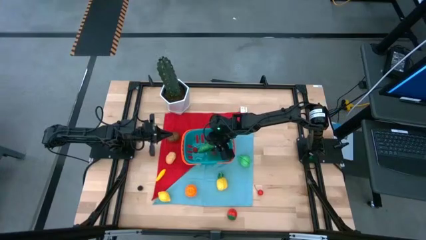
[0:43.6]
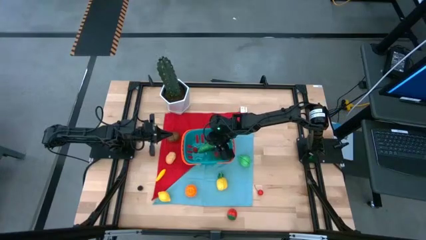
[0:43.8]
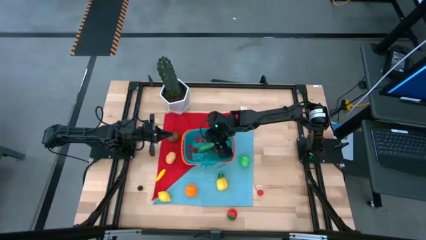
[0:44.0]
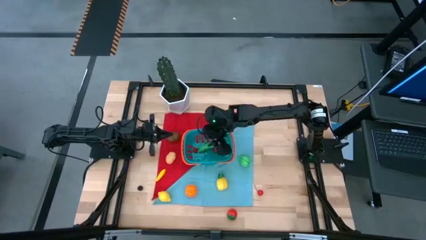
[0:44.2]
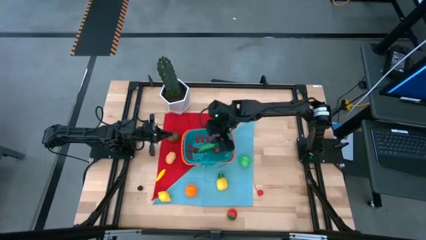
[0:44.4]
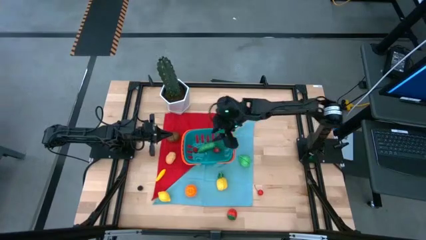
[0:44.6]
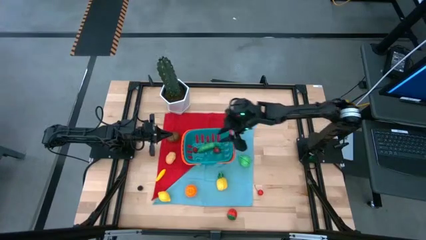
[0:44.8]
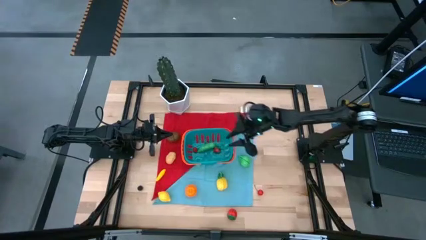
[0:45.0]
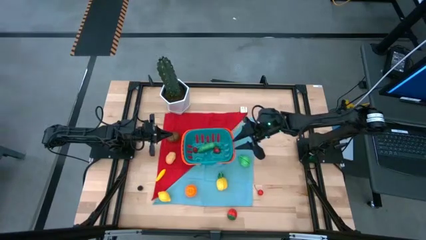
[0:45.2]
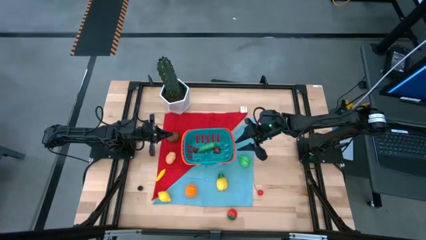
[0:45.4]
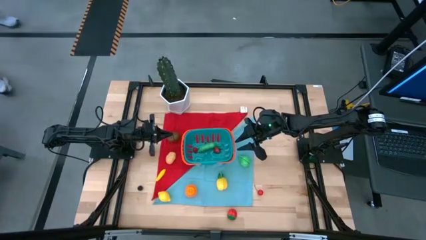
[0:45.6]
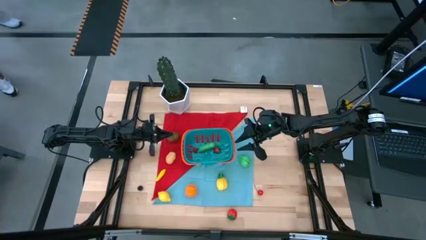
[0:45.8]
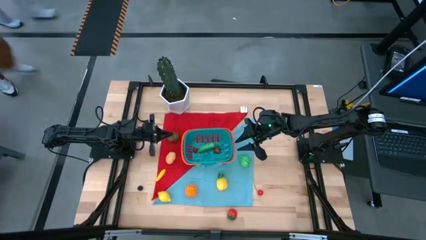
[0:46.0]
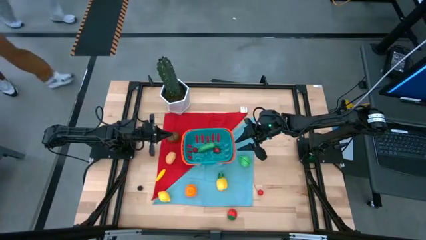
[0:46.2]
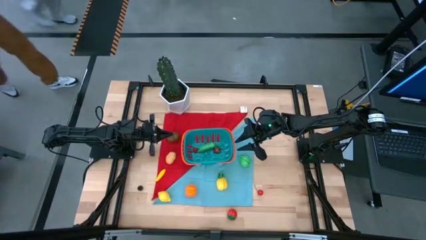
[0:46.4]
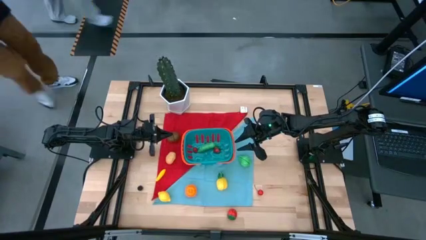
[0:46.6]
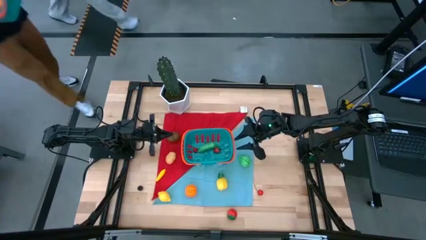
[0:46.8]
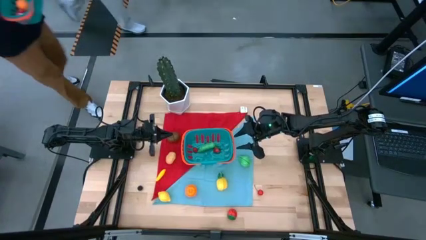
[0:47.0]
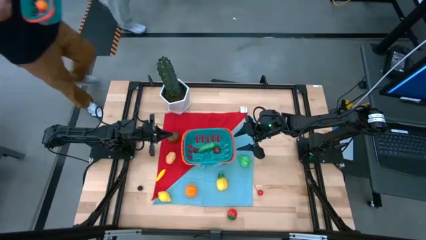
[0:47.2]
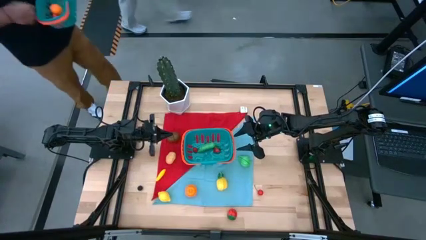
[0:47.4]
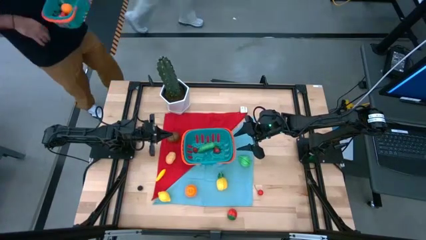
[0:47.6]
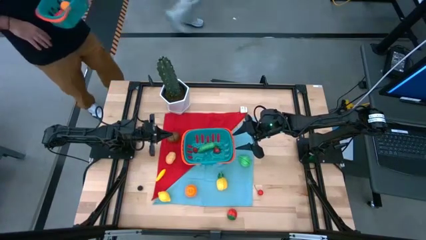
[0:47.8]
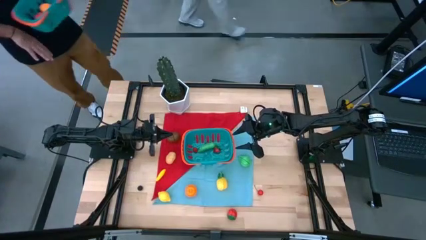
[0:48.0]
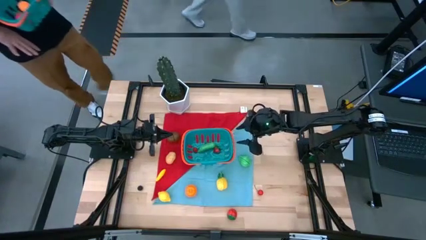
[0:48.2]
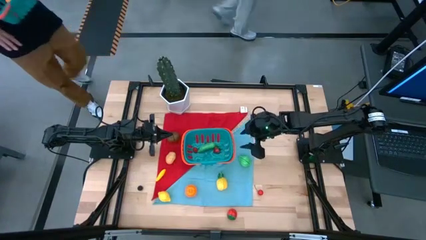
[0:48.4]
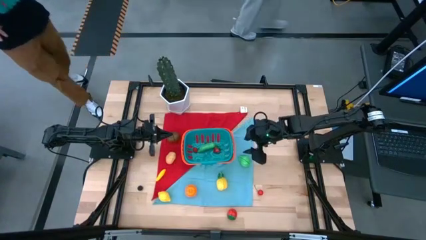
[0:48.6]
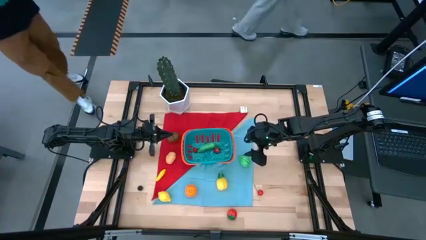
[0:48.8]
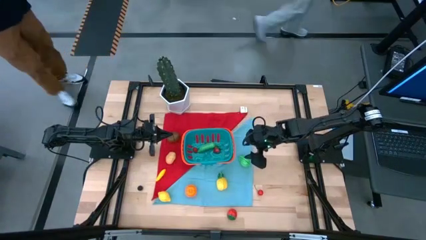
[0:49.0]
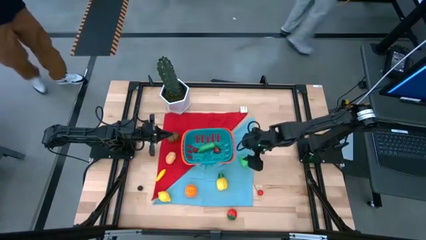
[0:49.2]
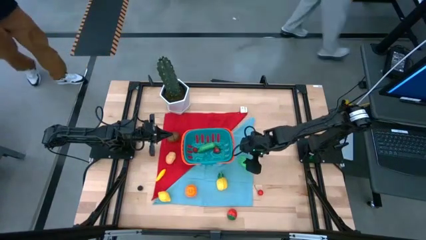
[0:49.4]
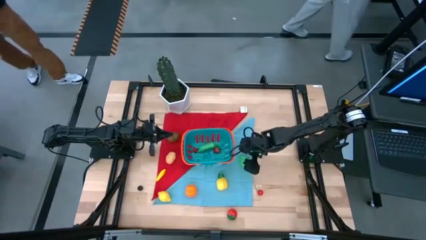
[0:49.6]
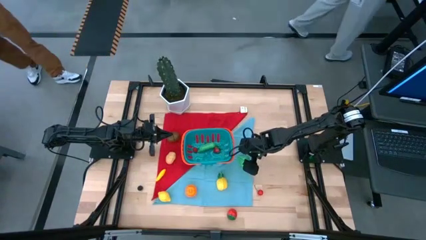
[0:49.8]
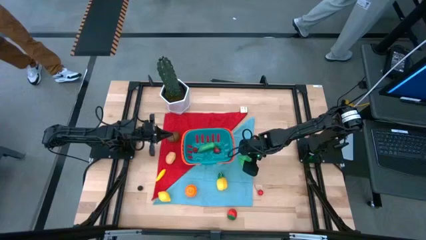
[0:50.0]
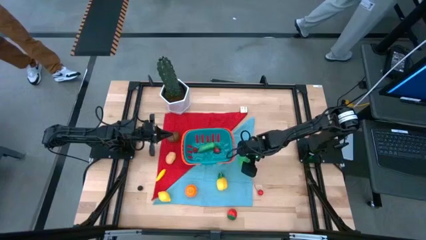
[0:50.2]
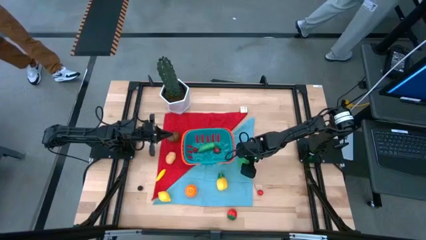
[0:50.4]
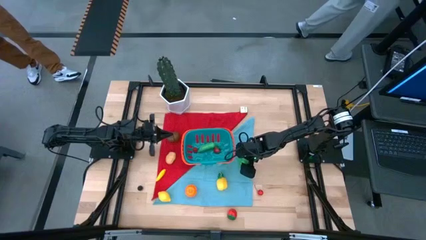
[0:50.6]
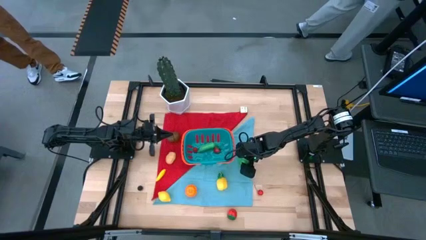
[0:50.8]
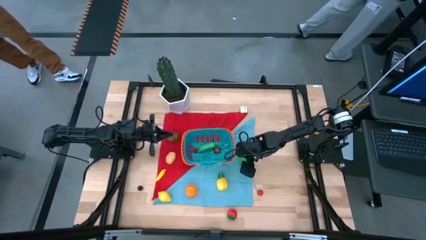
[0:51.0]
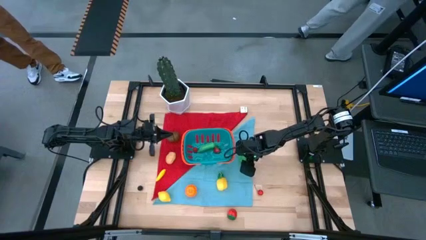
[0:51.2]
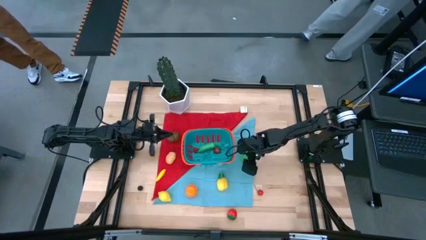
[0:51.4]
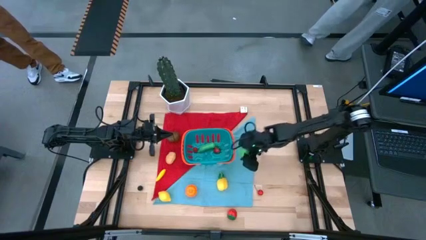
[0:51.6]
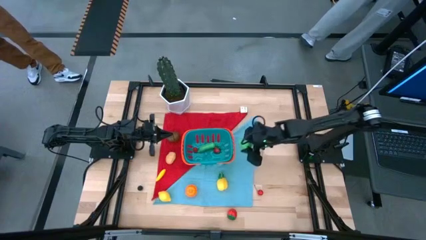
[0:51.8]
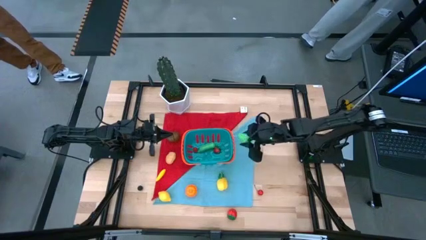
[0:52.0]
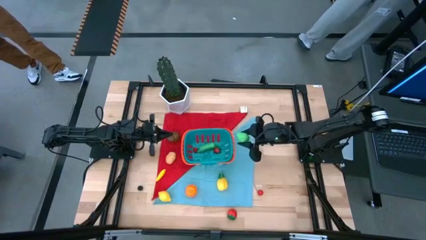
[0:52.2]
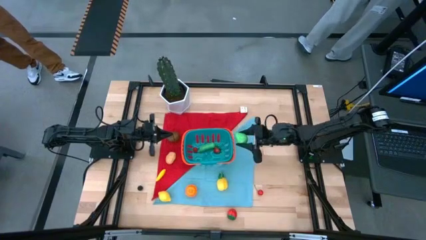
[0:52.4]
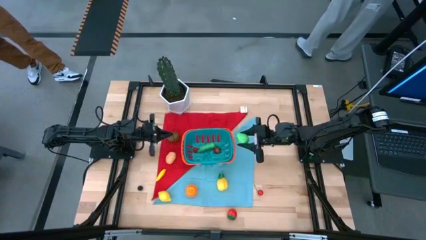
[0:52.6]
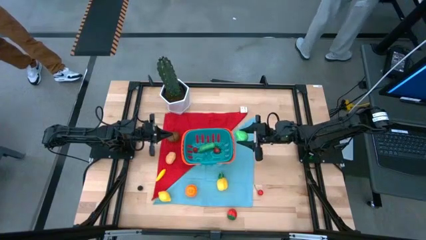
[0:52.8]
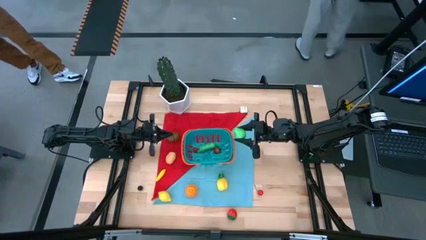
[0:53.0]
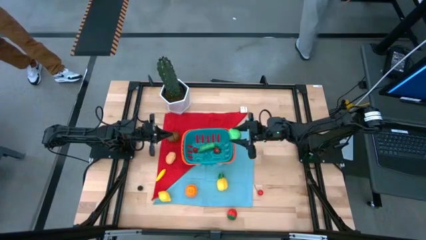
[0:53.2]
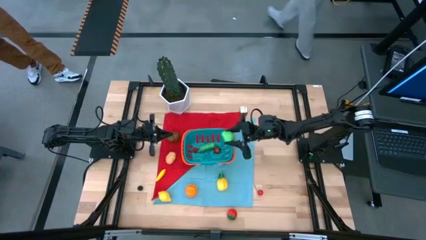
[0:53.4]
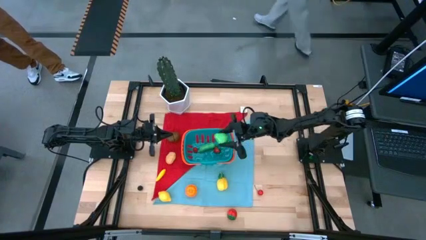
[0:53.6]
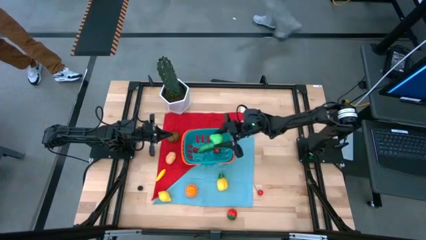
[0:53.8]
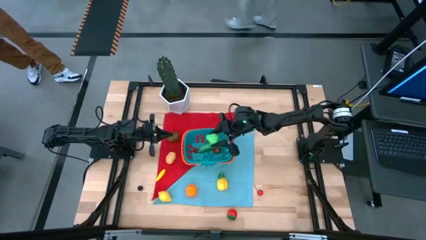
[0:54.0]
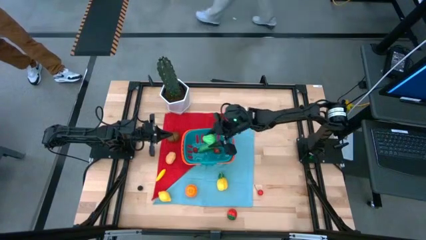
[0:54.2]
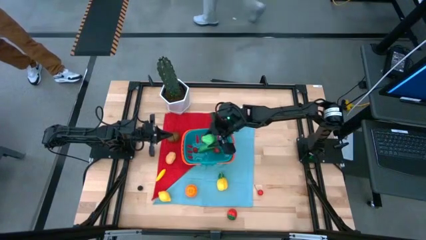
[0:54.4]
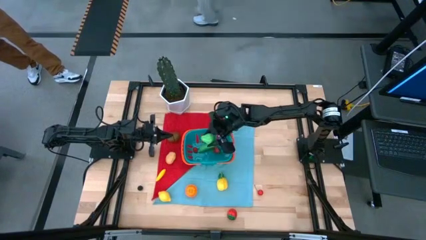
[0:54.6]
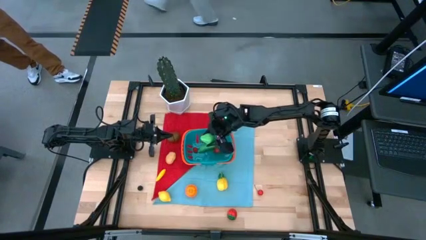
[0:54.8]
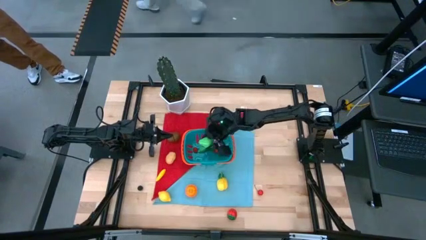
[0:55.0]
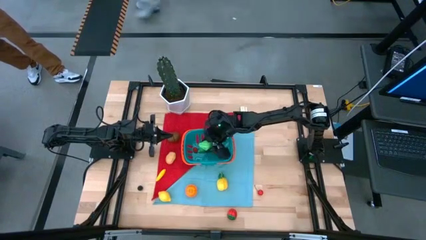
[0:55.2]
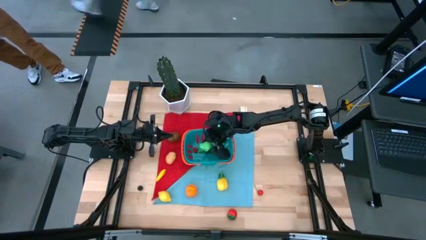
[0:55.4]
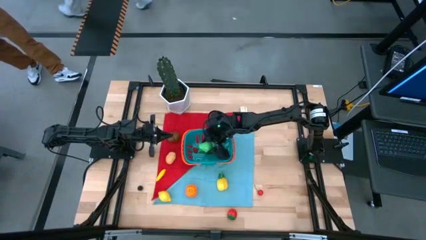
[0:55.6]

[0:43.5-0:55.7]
Task: Build produce basket
Put the green pear into the blue basket
